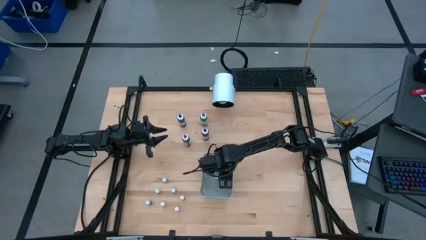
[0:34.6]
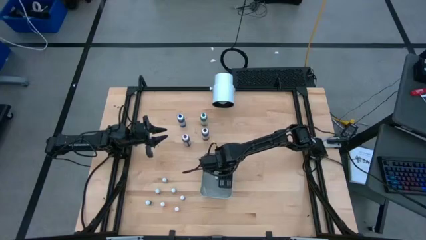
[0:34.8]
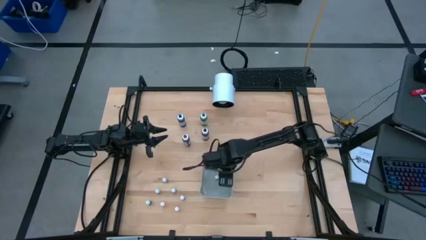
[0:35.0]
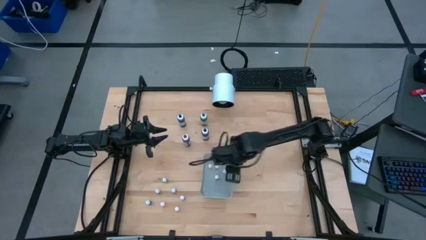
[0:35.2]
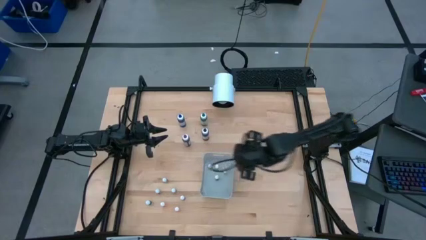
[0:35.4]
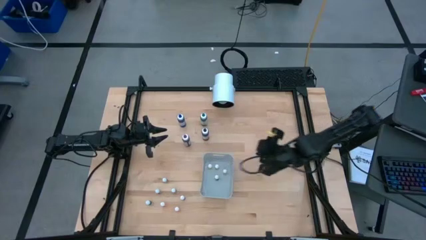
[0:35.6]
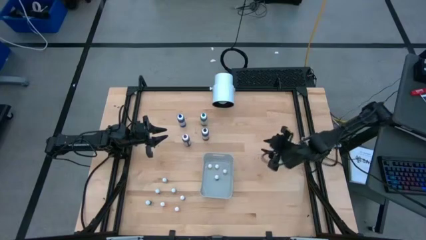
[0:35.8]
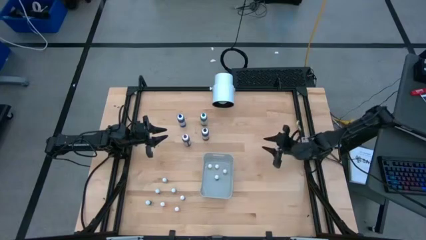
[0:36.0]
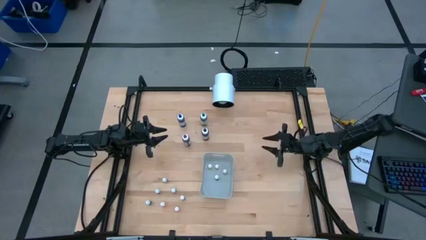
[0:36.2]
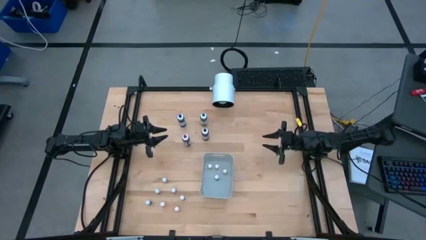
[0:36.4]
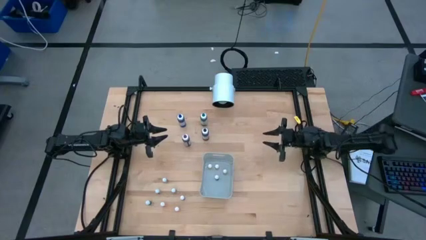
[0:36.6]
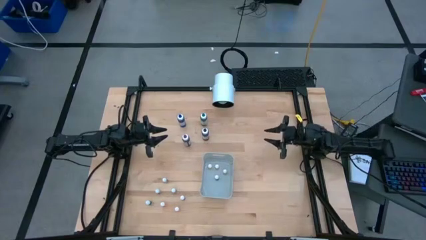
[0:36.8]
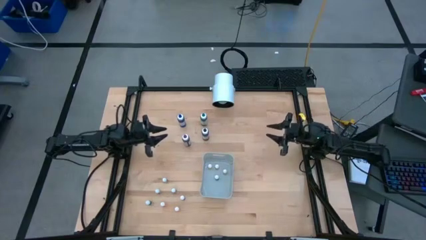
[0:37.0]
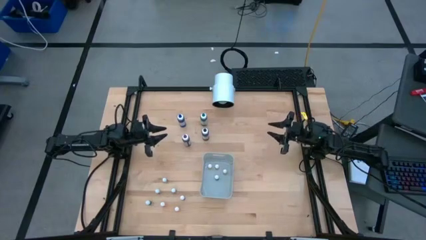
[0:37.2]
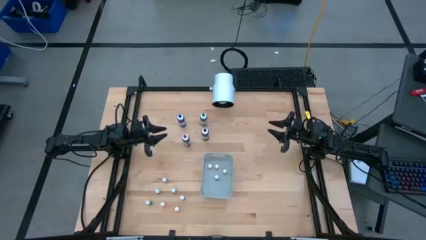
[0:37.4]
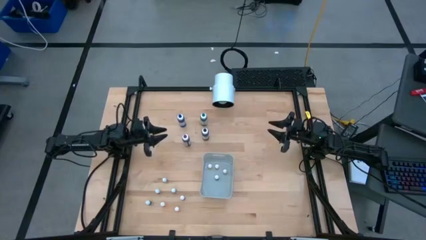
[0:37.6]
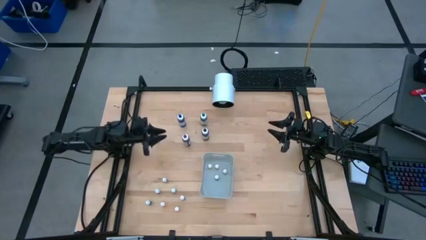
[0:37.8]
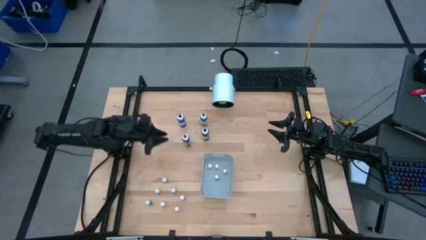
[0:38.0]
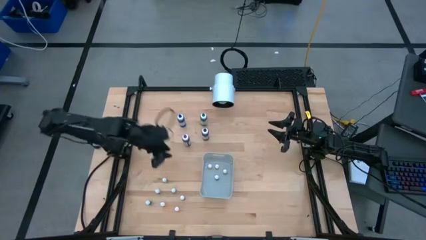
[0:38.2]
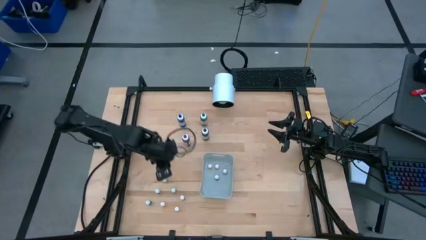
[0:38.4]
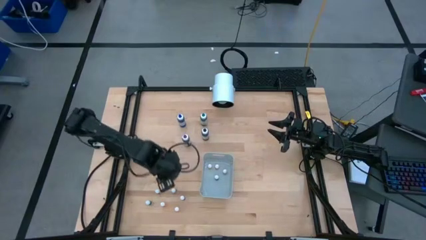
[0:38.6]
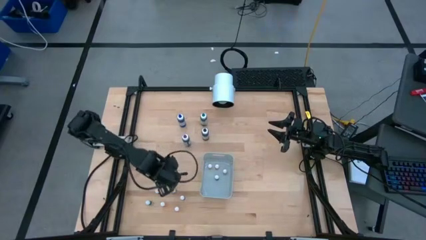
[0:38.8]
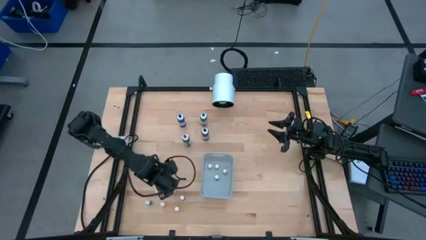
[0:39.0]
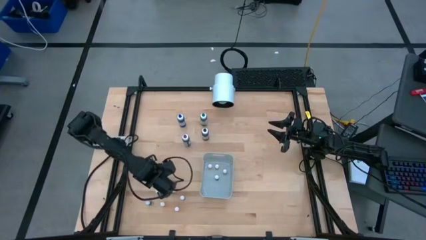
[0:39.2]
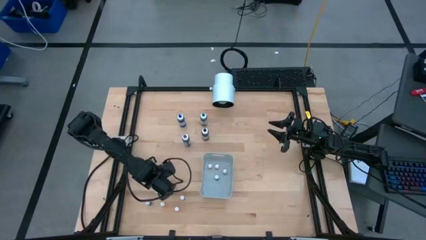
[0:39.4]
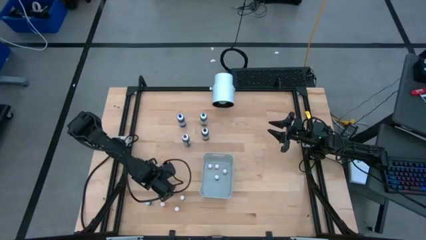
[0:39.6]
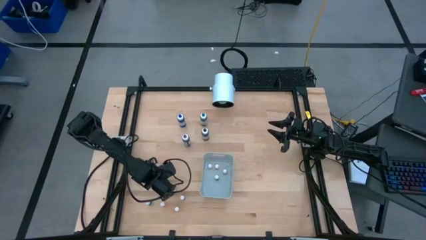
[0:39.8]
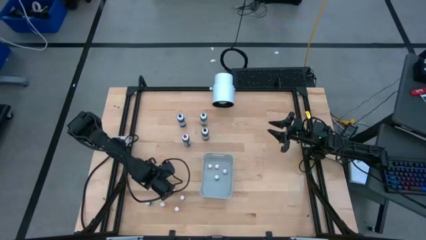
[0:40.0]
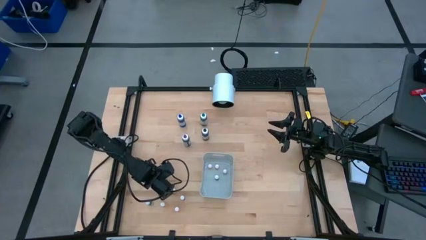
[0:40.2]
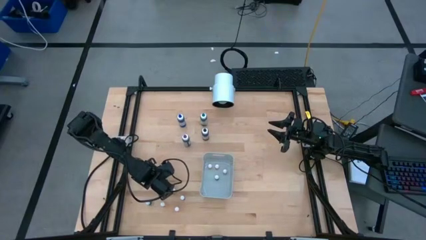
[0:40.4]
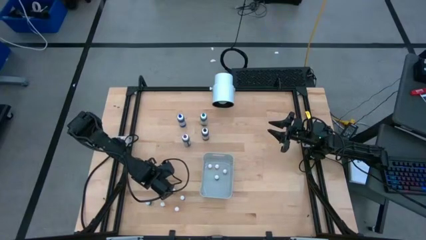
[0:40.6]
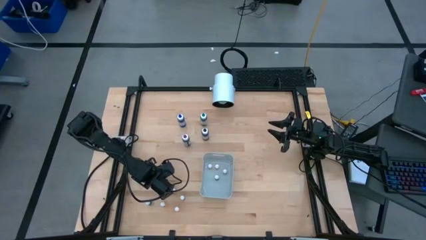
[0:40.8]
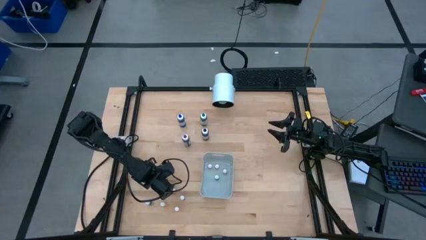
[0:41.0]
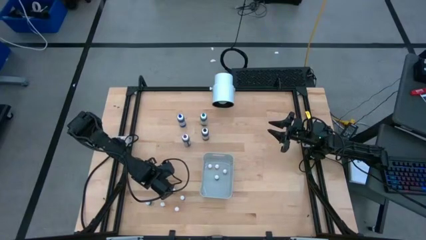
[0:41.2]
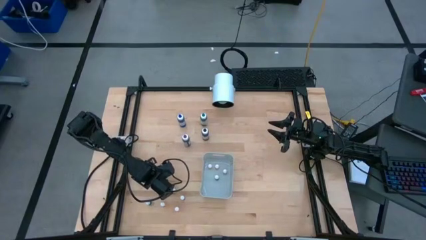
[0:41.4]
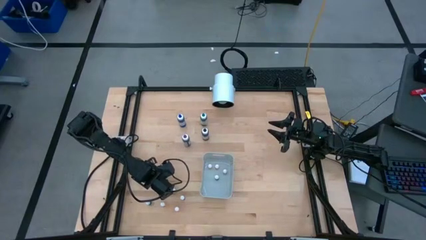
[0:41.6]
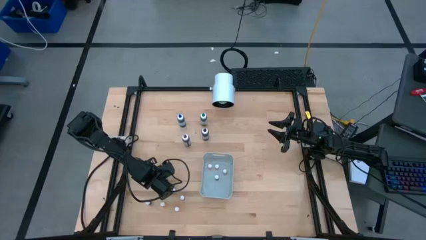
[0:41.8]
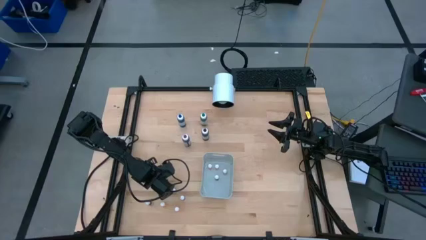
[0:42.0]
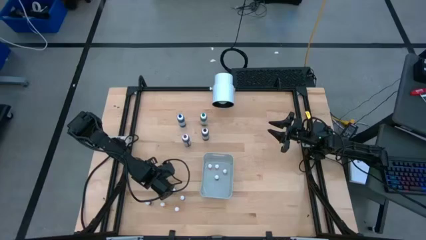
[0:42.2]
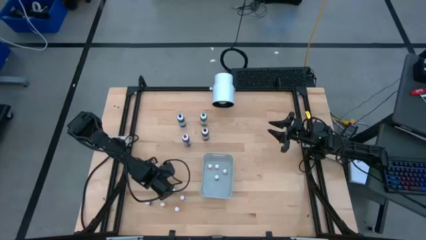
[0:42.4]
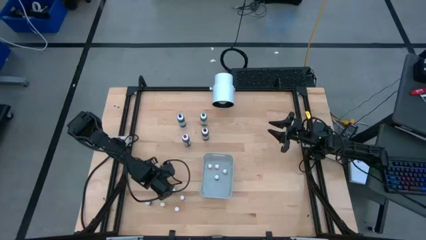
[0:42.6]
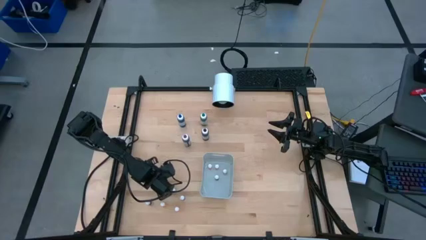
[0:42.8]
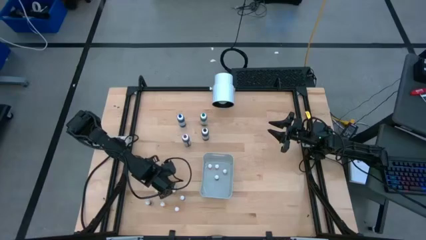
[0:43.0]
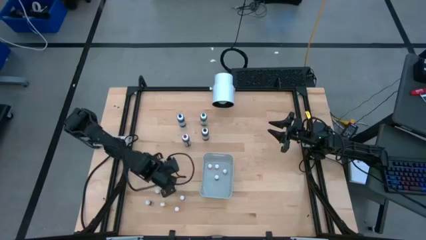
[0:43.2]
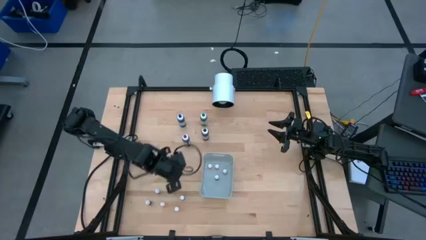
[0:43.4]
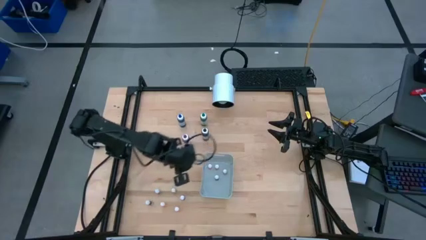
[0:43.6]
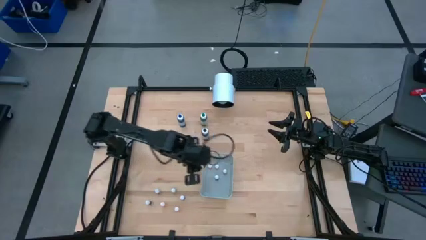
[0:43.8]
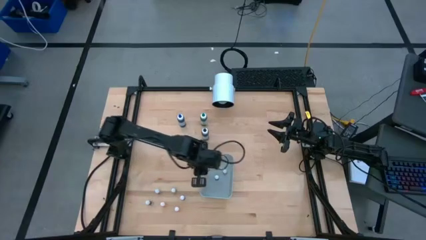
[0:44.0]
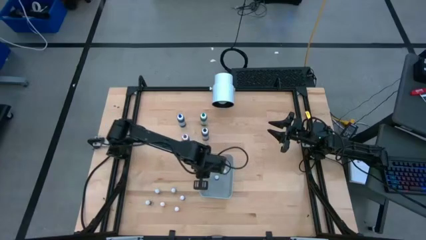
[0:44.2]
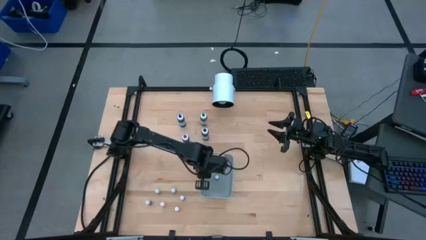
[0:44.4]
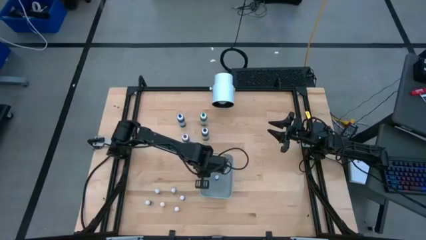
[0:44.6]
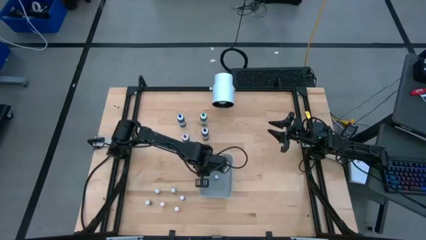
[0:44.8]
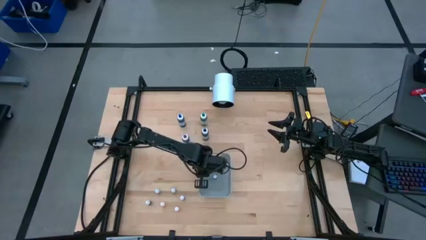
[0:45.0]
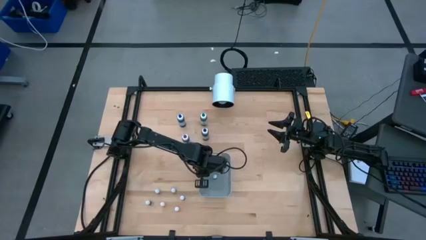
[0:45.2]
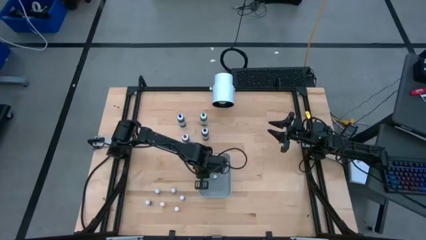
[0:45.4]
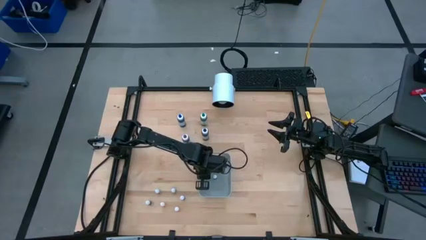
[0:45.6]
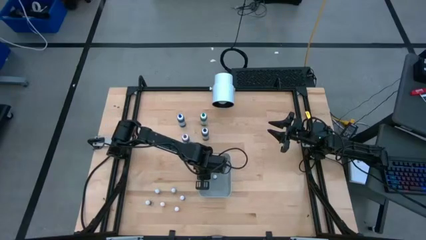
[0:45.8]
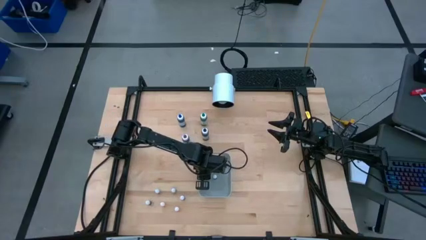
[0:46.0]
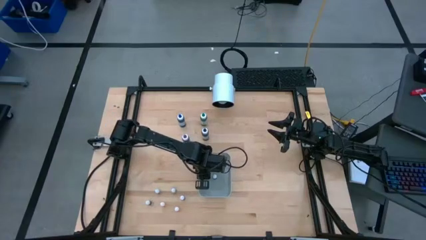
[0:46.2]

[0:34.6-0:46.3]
Task: Pick & Place food coloring
Put the small black food coloring bottle into the gray bin

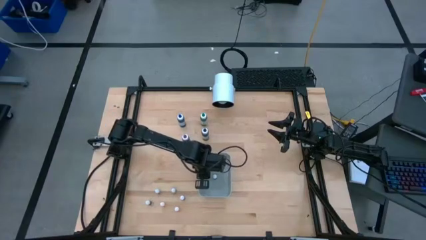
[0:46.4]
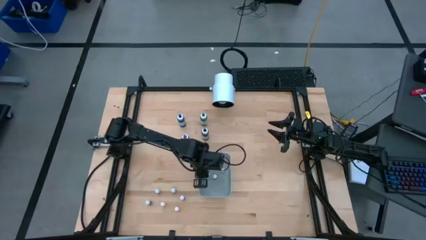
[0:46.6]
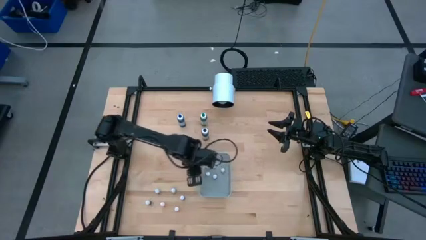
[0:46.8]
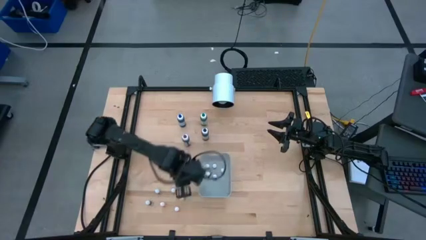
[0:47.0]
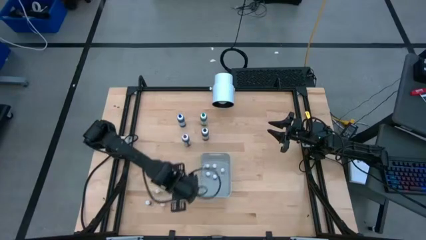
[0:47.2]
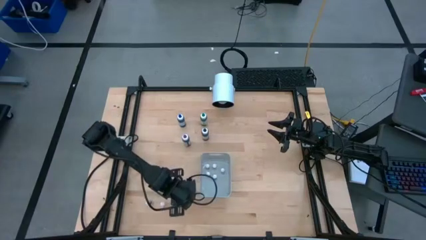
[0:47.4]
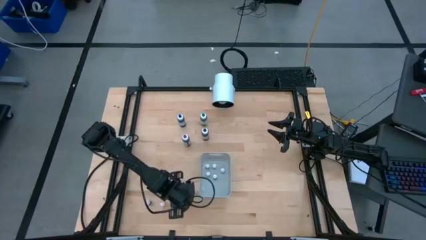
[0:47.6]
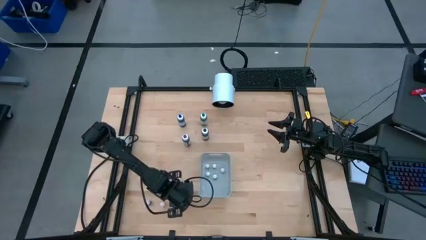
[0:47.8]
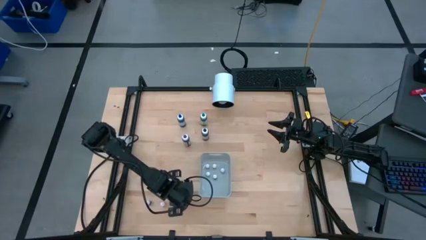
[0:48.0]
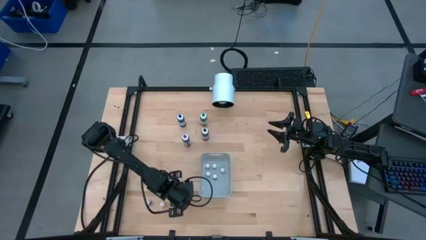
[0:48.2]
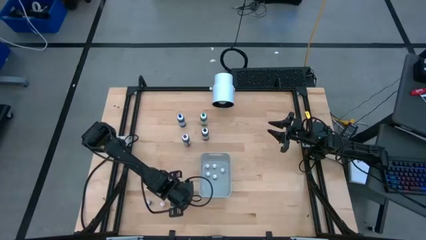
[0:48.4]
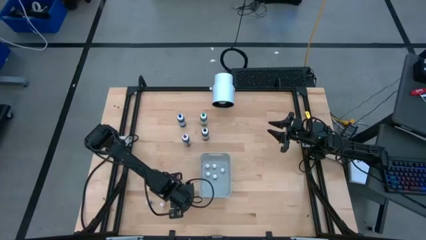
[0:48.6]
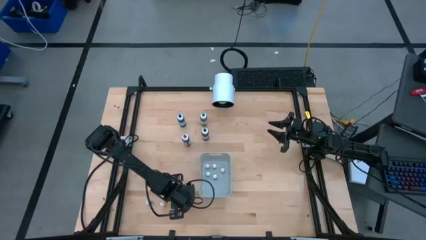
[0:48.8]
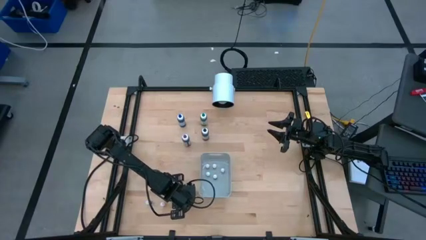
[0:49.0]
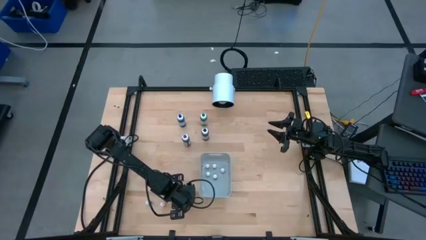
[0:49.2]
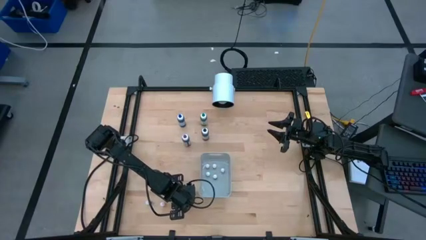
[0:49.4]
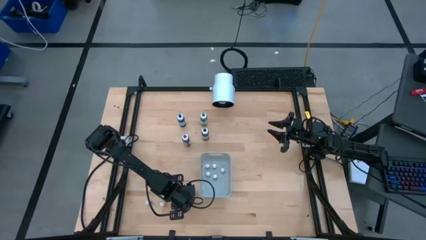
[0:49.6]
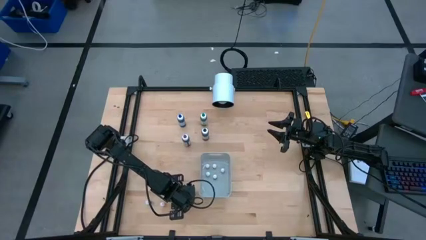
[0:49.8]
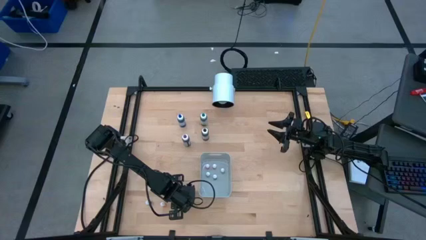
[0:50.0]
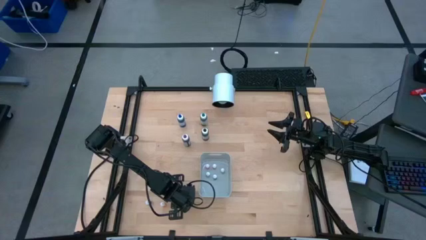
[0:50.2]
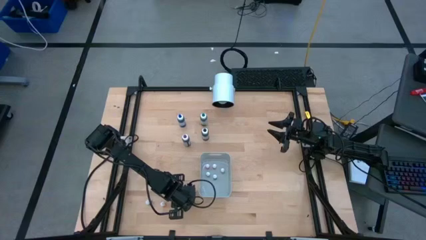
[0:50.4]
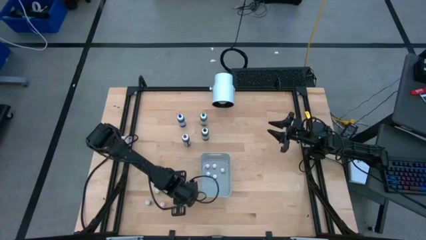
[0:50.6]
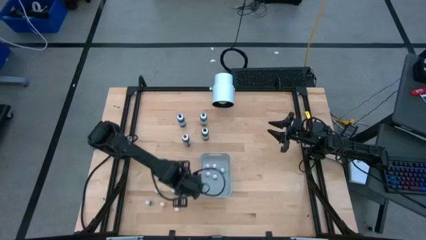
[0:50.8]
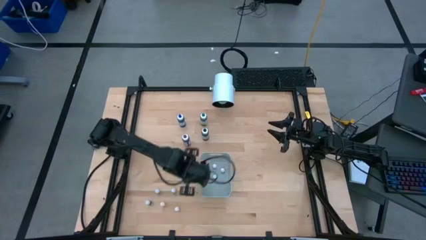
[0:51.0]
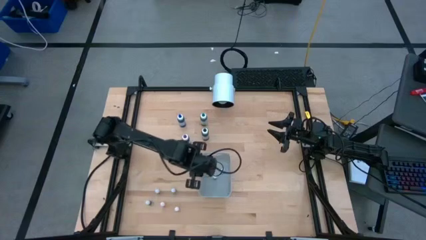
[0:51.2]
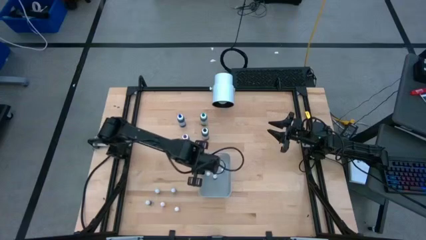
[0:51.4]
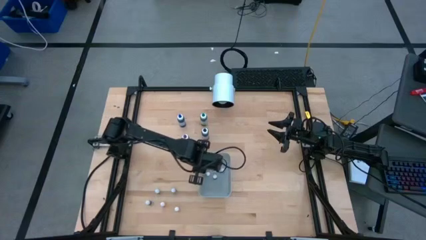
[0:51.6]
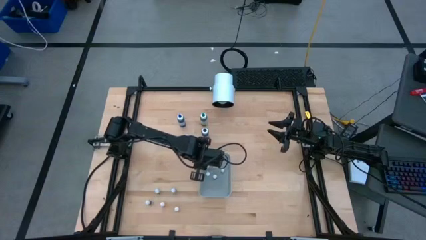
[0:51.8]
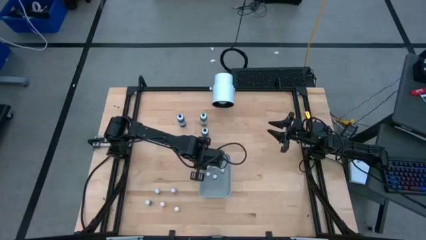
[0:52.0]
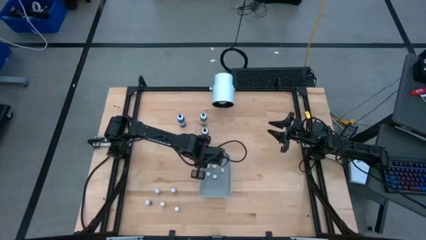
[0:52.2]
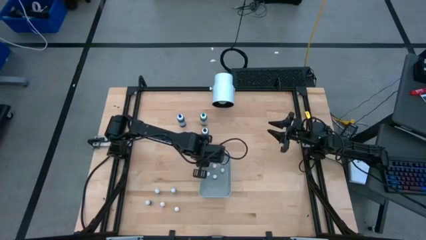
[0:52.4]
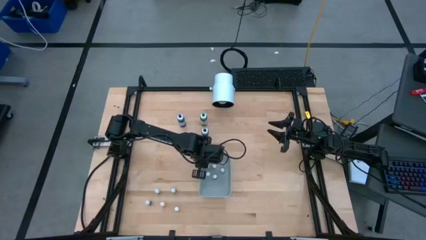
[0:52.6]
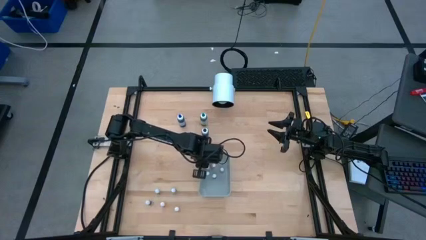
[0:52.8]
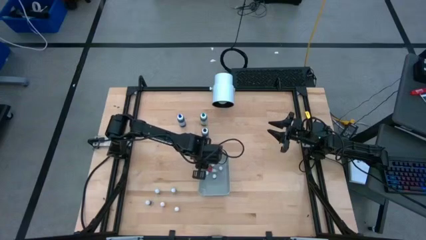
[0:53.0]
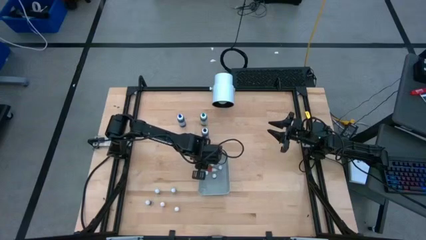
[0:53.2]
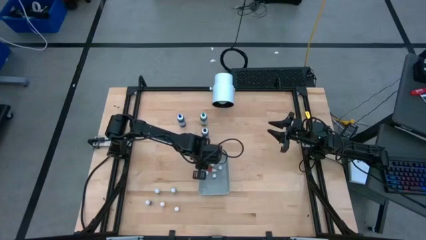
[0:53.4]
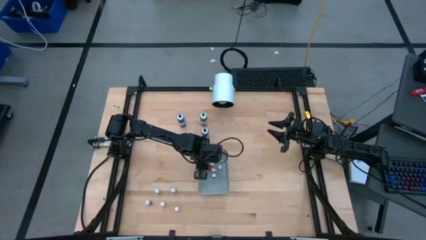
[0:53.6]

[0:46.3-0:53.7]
Put the small red food coloring bottle into the gray bin
